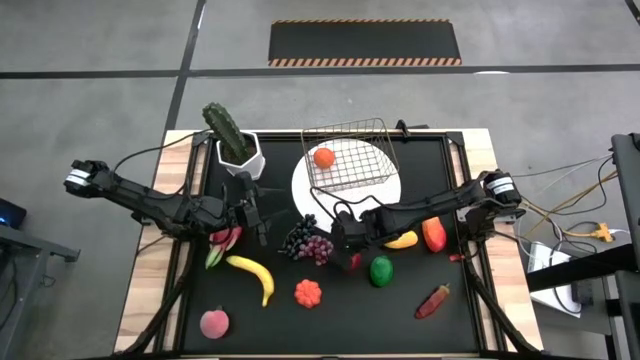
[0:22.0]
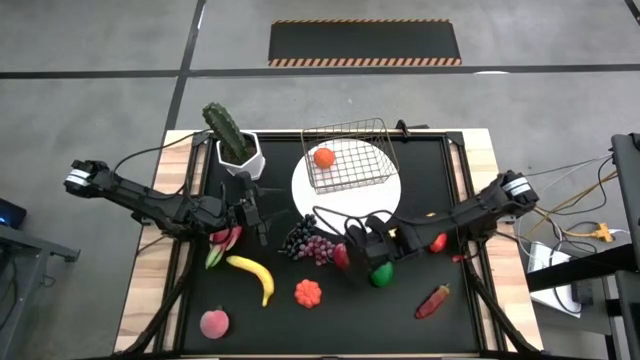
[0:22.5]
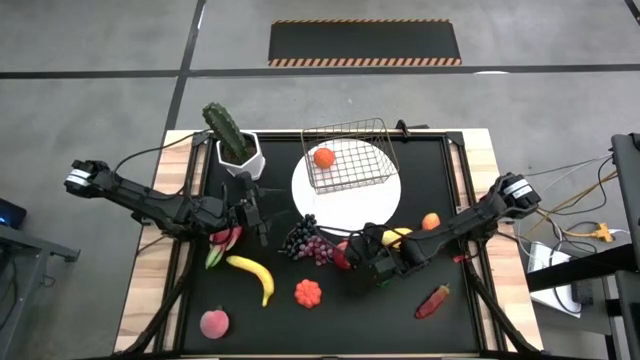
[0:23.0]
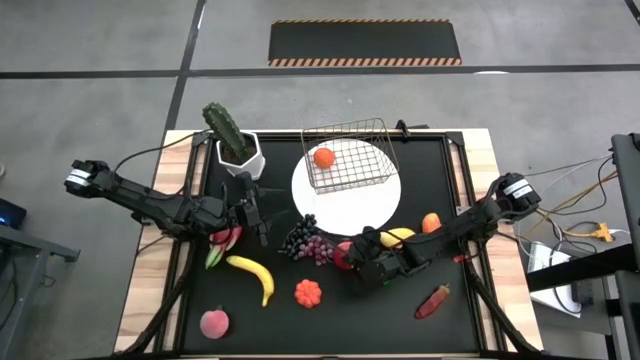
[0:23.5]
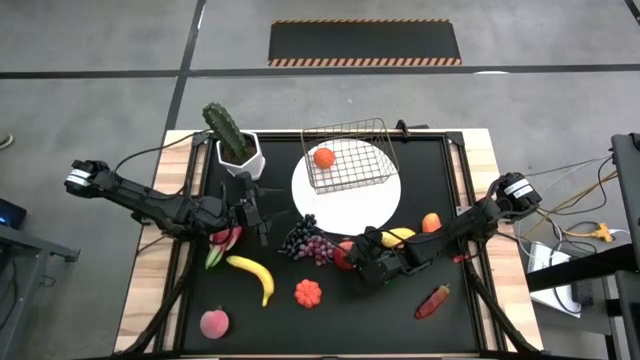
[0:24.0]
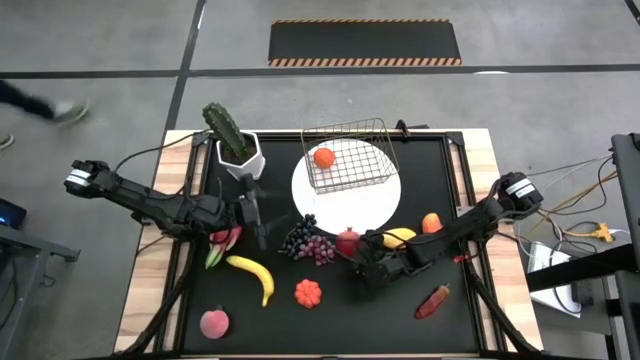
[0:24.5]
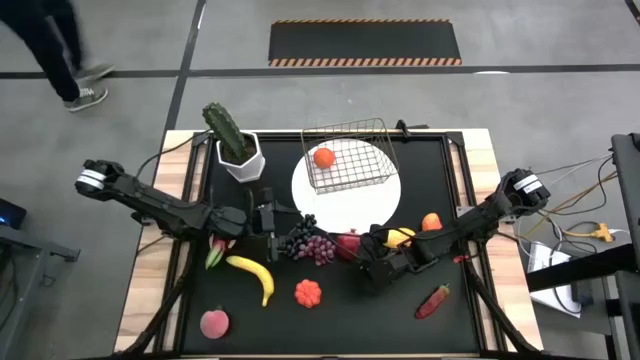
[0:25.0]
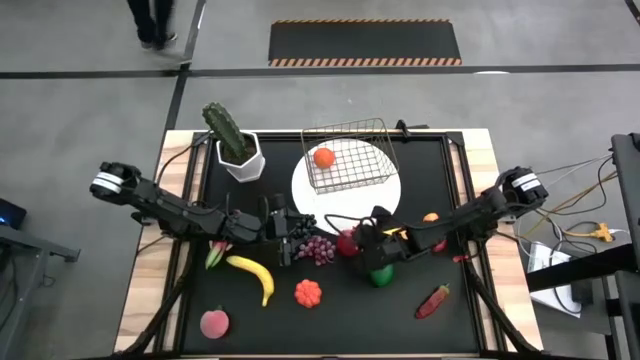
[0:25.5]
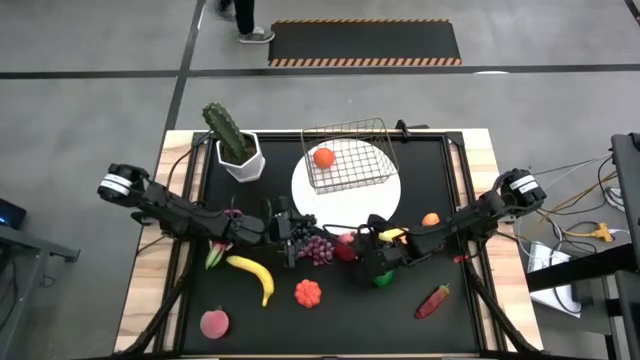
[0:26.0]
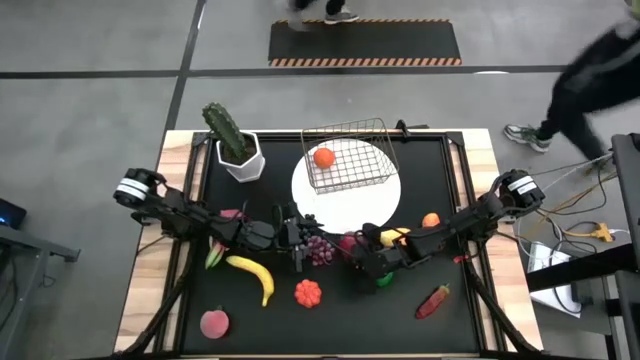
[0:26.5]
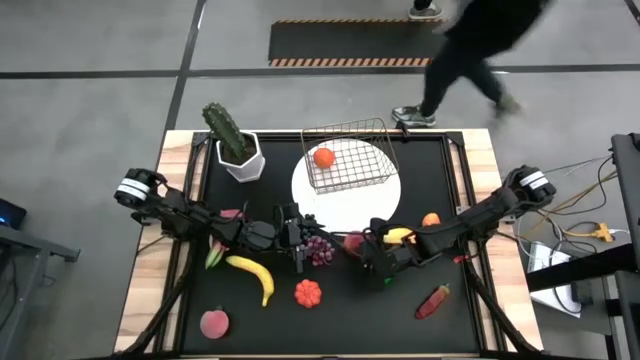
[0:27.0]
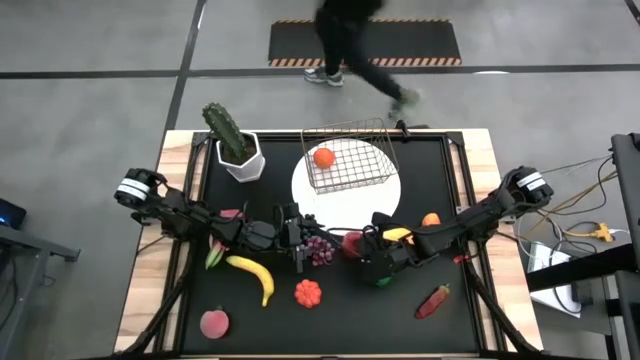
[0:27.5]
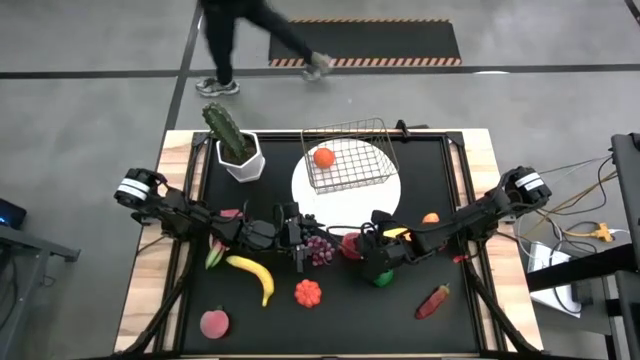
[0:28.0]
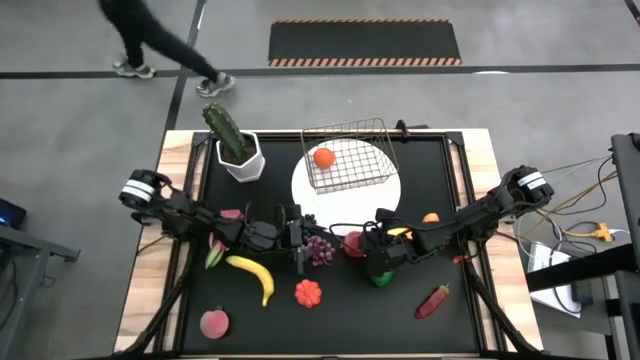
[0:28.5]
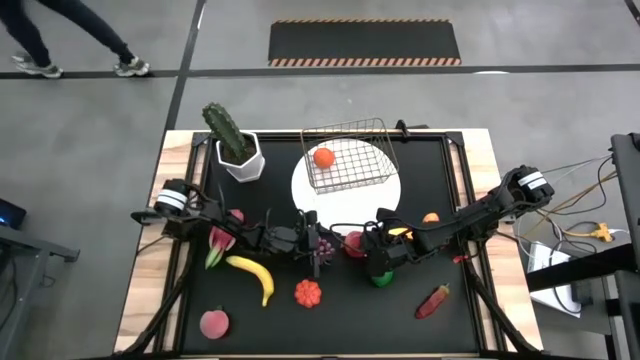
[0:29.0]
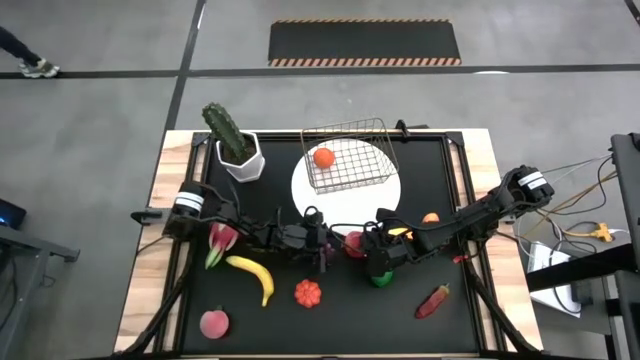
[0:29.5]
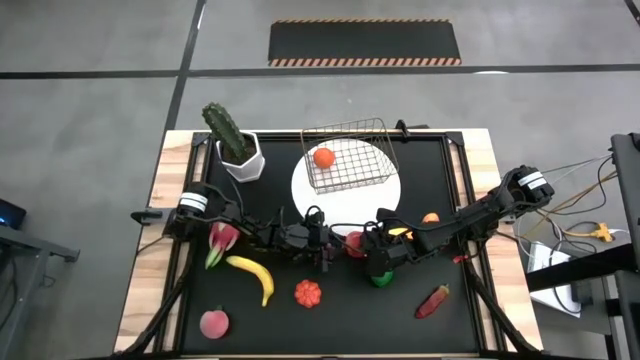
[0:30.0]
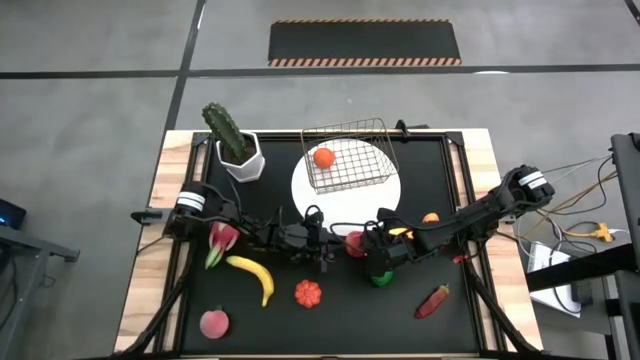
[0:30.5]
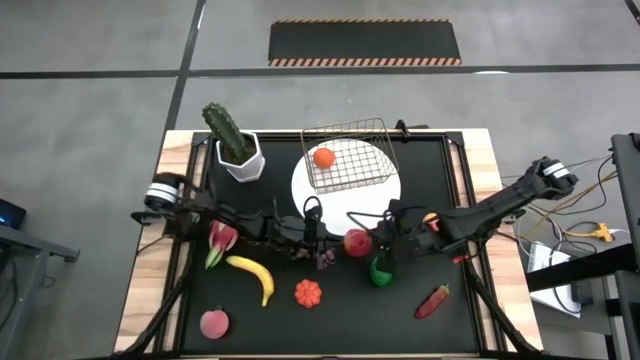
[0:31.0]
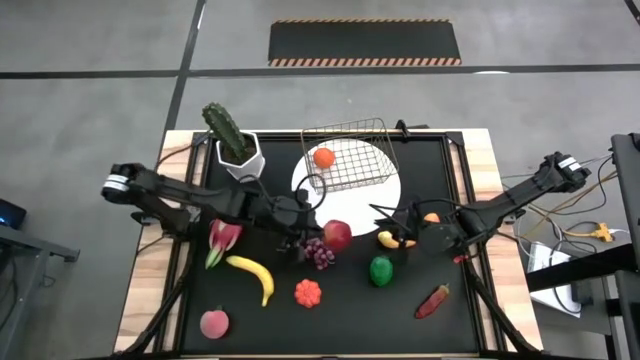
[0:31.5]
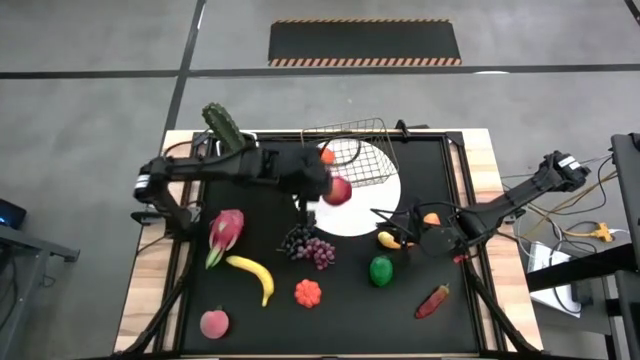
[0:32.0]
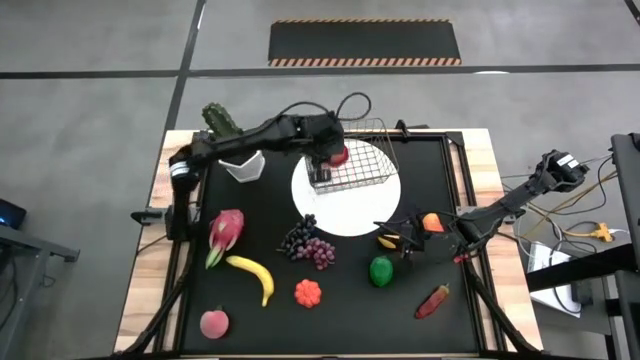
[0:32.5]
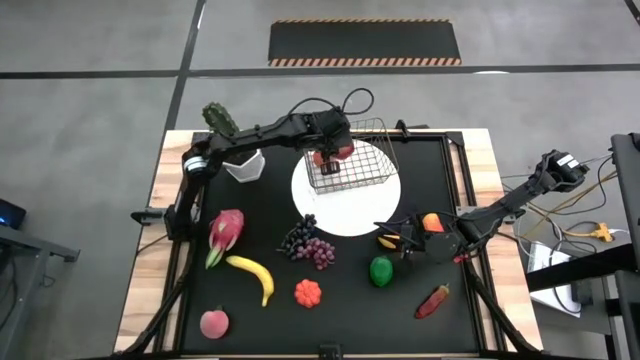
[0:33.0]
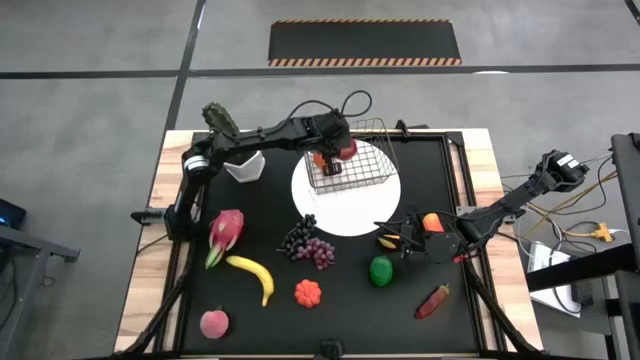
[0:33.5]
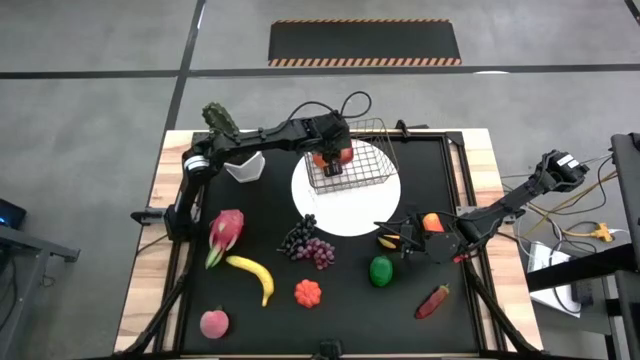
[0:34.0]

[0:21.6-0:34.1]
Task: Build produce basket
Put the red pomegranate into the wire basket

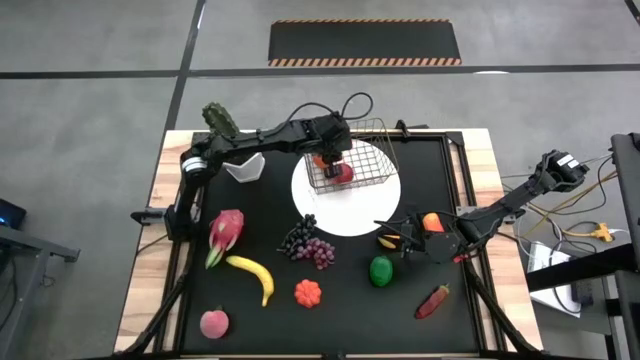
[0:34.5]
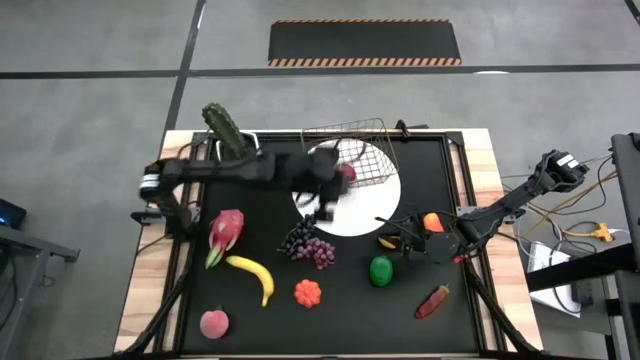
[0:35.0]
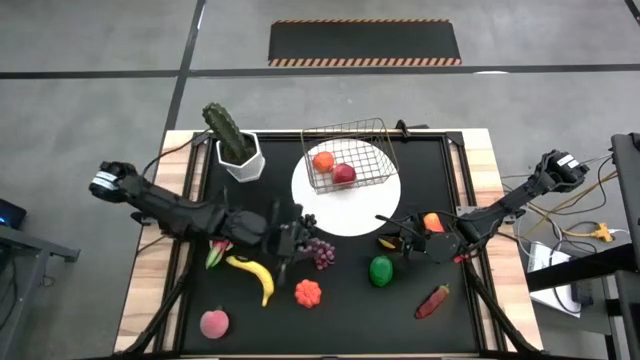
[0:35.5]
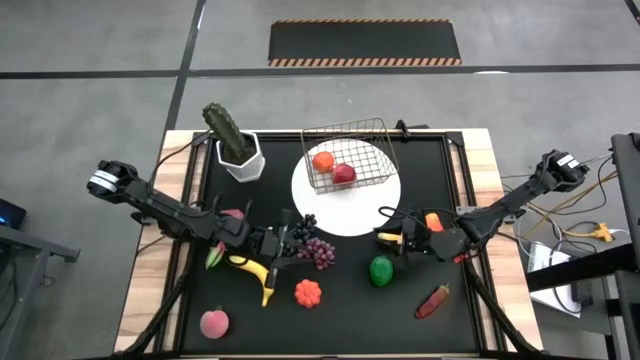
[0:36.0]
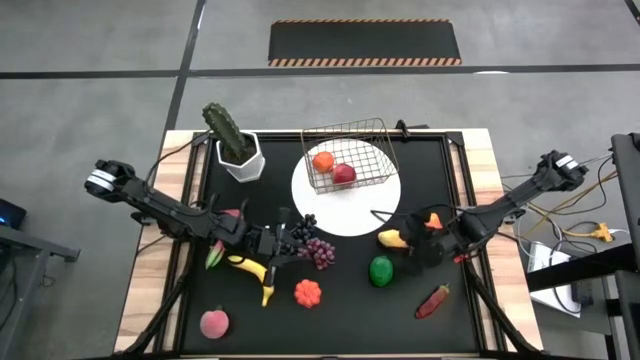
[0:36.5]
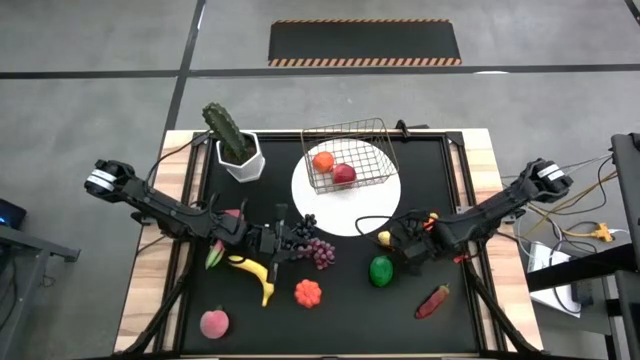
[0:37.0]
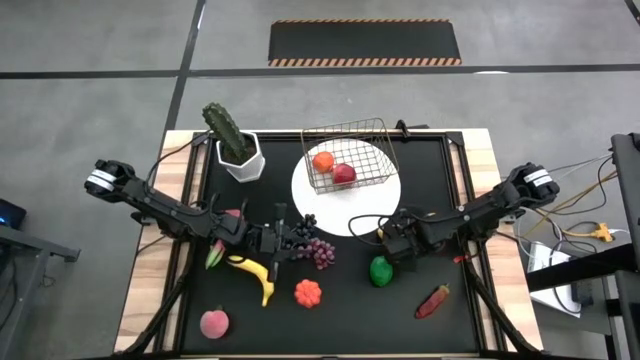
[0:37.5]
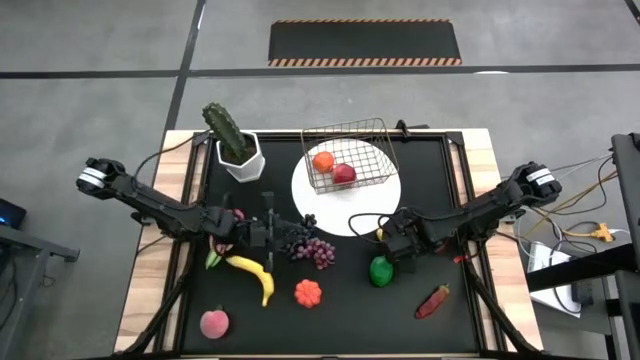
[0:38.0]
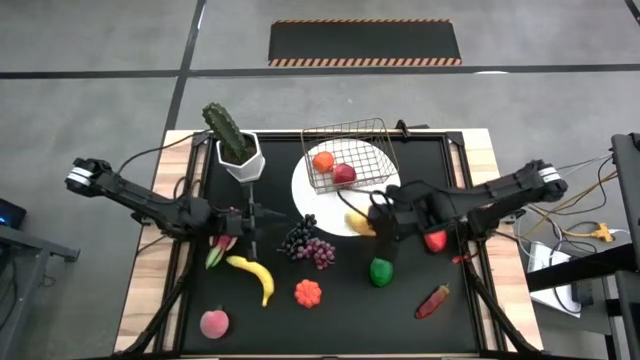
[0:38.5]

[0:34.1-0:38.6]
Put the yellow mango into the wire basket

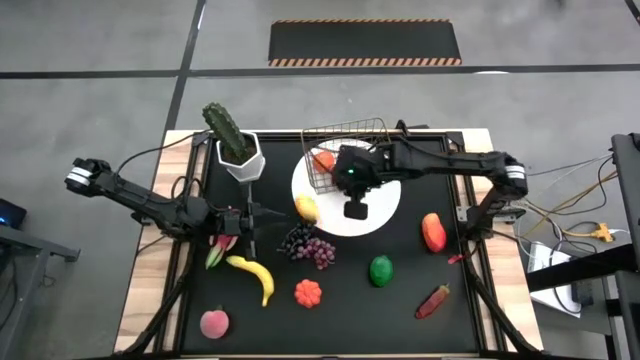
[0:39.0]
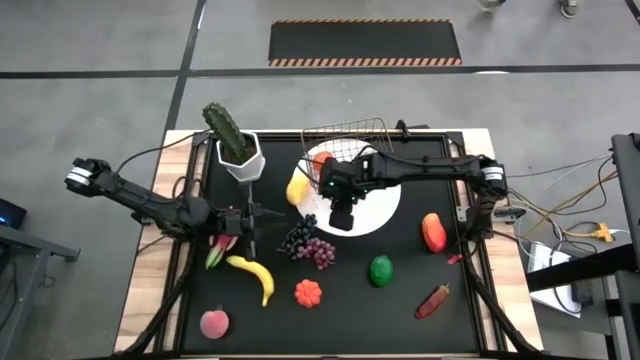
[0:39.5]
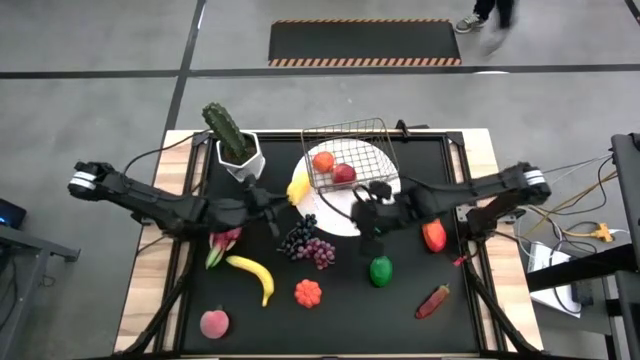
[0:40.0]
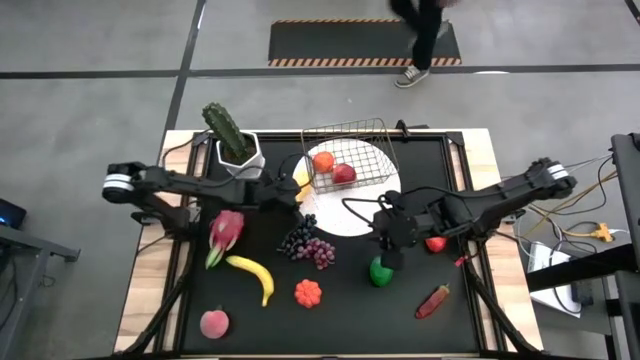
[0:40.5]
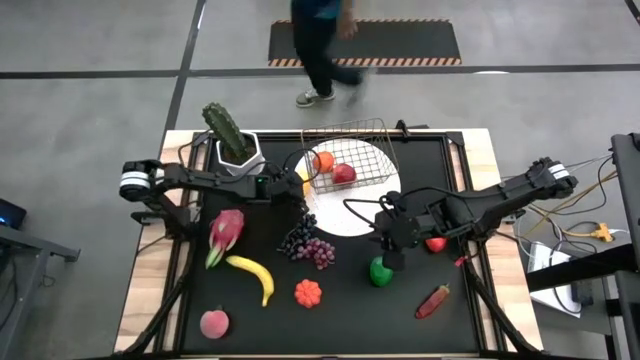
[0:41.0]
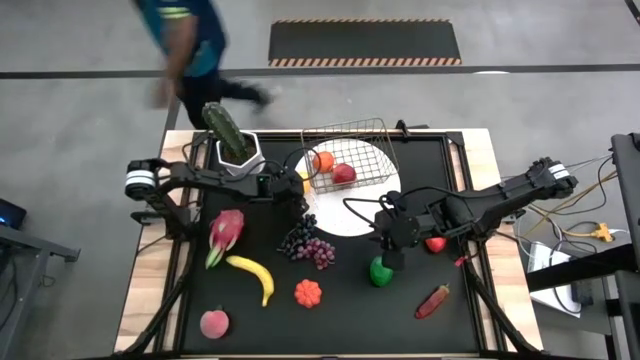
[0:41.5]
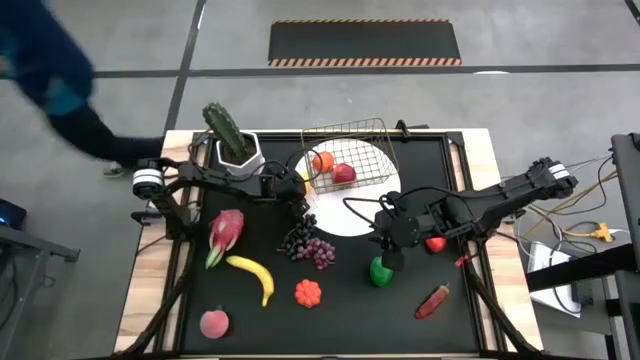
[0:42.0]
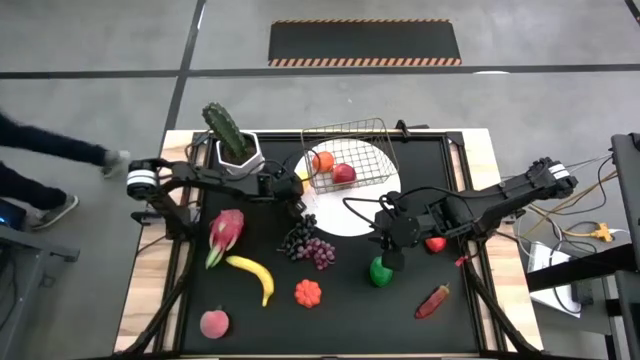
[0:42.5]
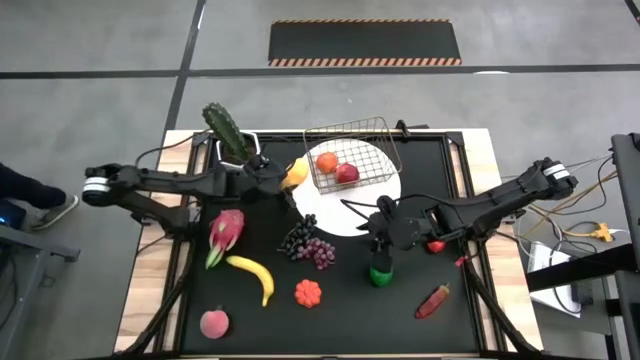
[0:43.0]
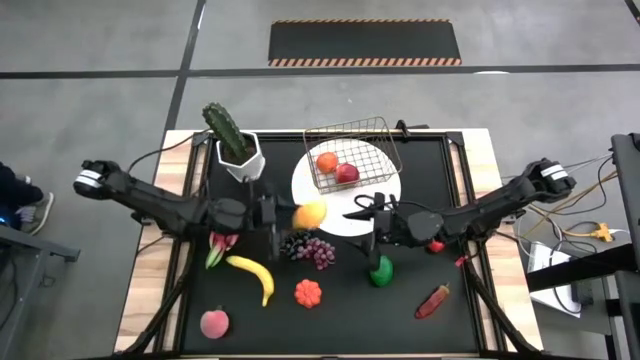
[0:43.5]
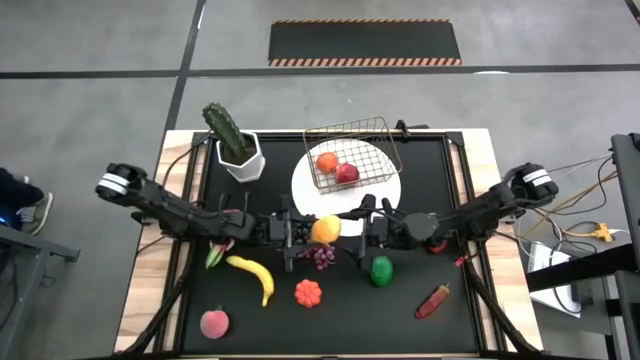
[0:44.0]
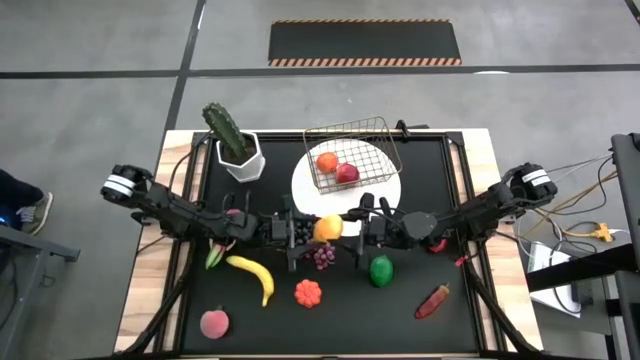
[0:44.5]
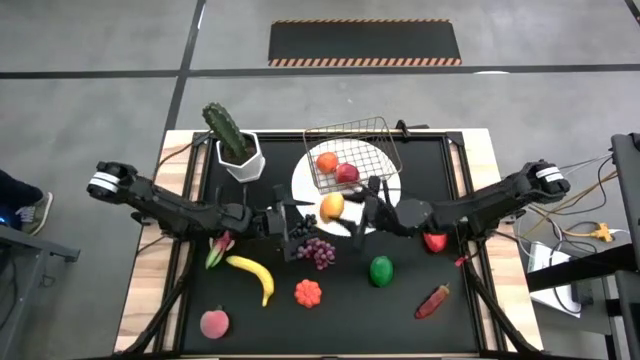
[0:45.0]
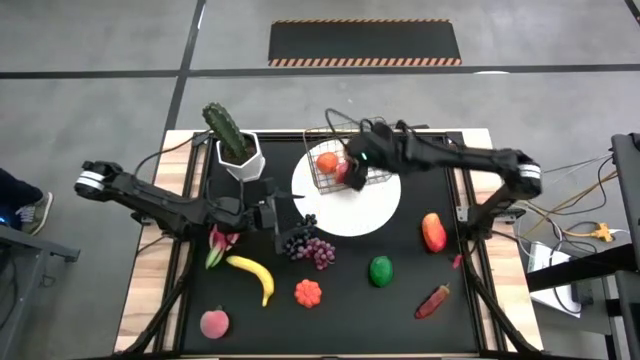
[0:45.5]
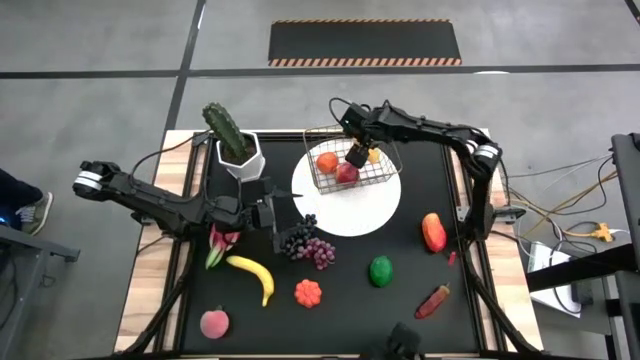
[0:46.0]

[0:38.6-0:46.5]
Put the yellow mango into the wire basket
